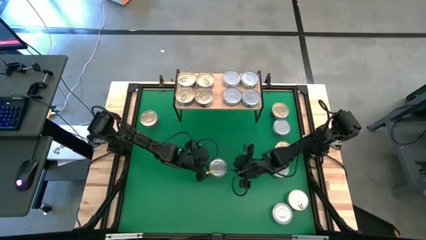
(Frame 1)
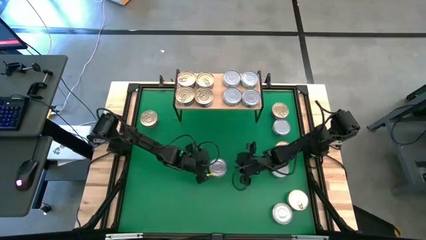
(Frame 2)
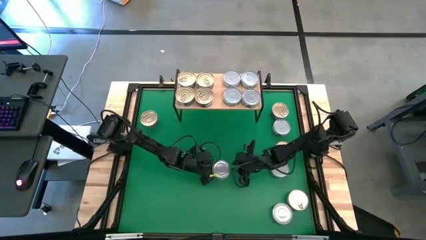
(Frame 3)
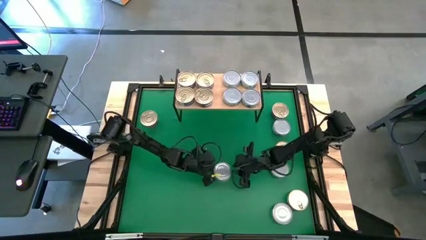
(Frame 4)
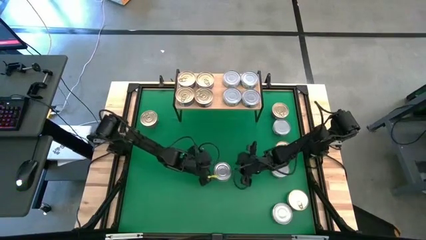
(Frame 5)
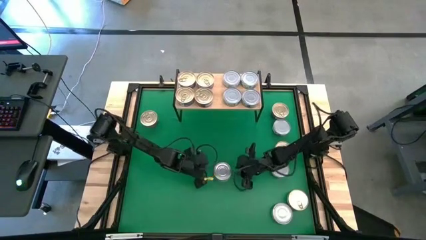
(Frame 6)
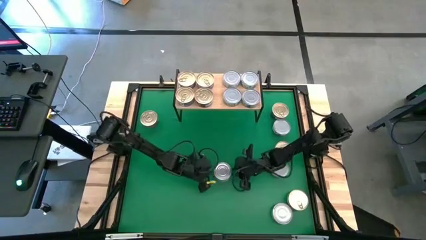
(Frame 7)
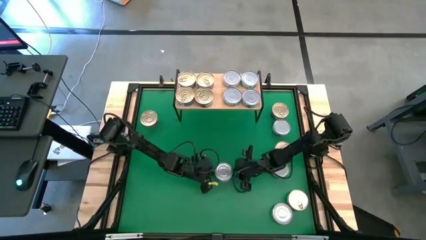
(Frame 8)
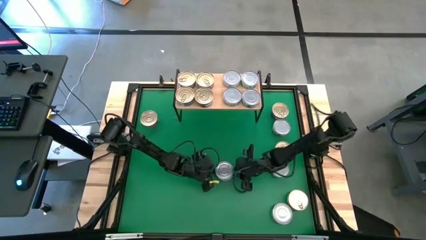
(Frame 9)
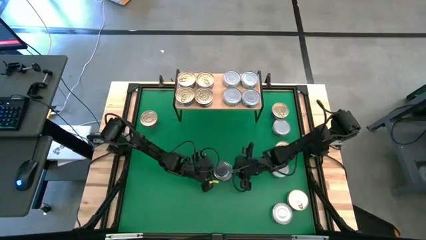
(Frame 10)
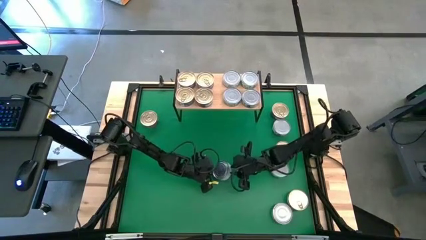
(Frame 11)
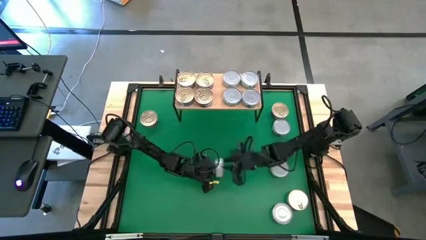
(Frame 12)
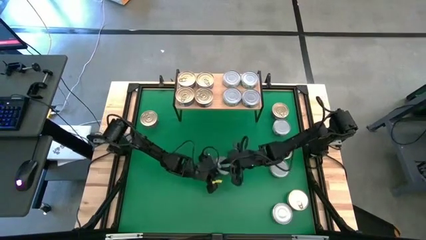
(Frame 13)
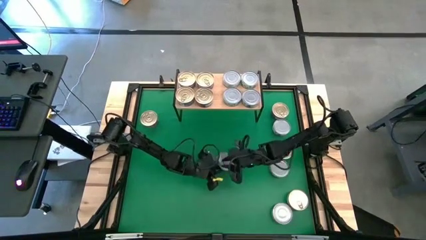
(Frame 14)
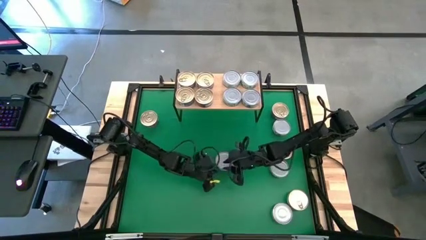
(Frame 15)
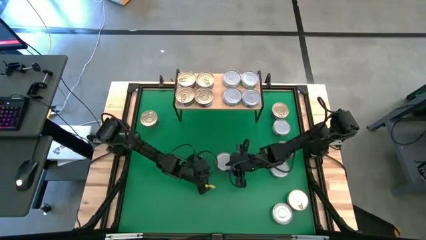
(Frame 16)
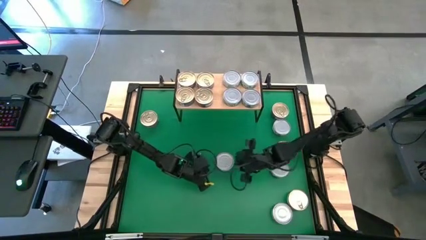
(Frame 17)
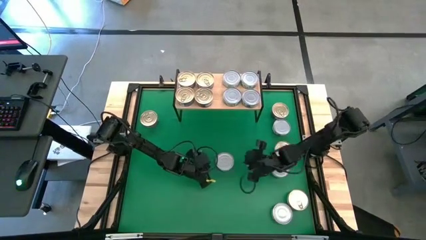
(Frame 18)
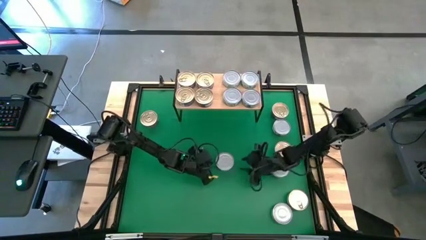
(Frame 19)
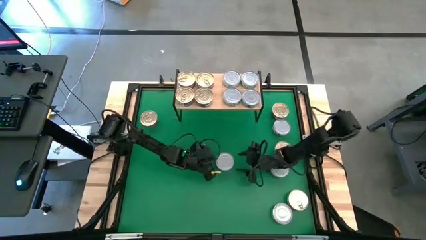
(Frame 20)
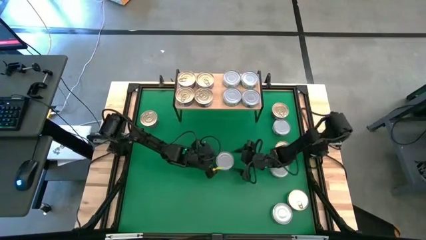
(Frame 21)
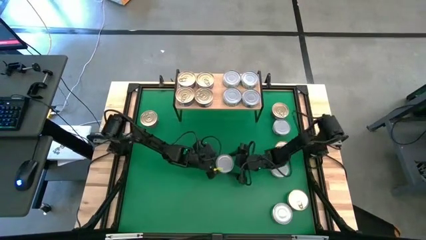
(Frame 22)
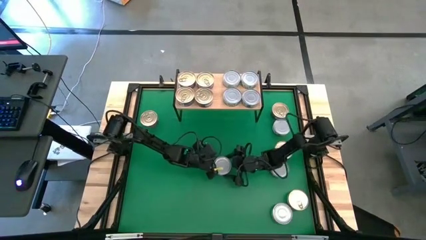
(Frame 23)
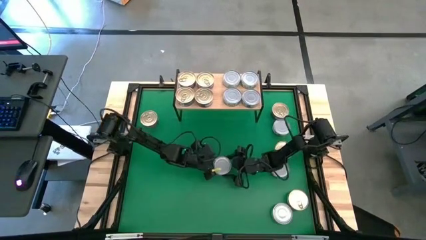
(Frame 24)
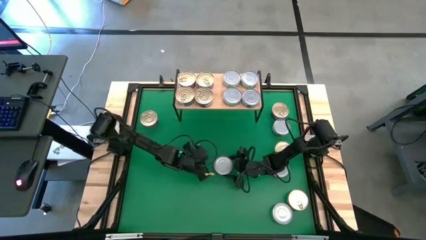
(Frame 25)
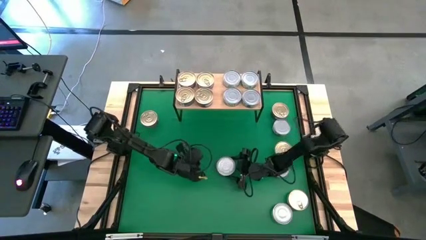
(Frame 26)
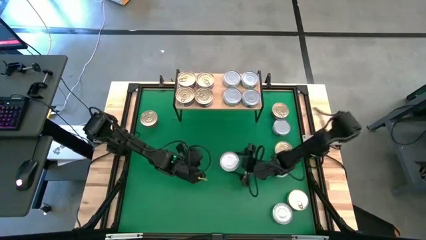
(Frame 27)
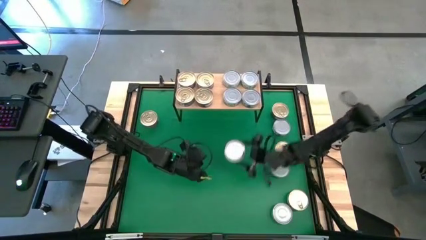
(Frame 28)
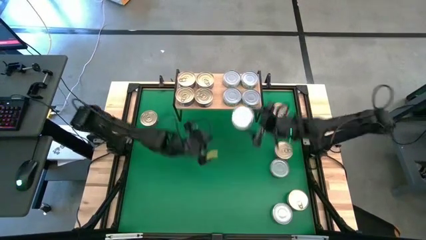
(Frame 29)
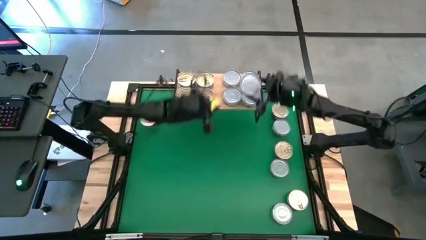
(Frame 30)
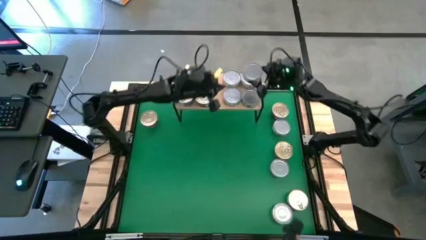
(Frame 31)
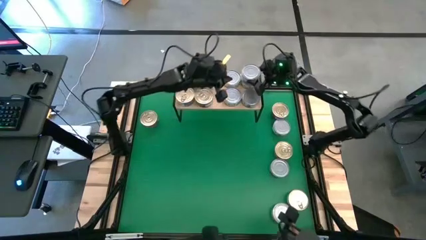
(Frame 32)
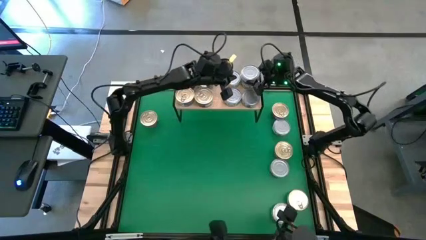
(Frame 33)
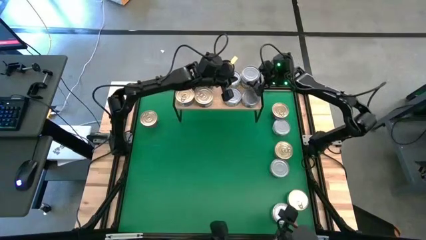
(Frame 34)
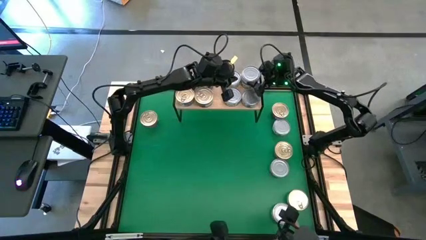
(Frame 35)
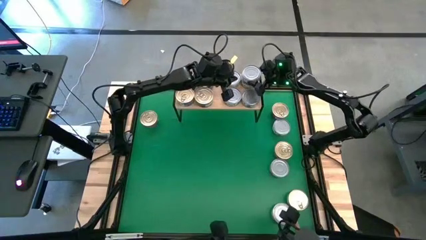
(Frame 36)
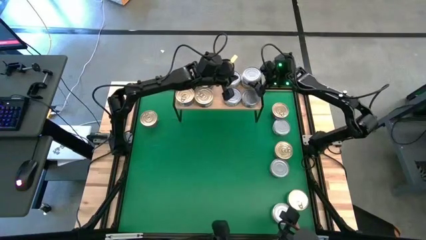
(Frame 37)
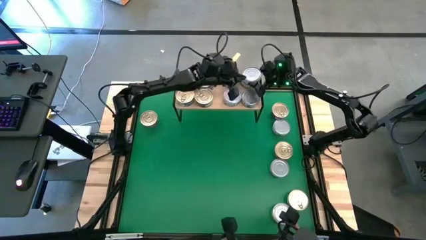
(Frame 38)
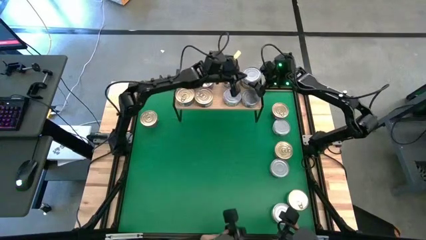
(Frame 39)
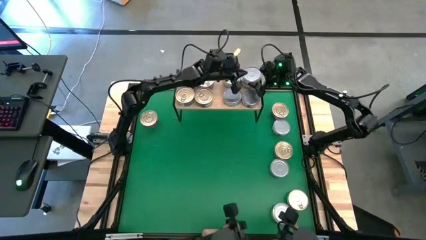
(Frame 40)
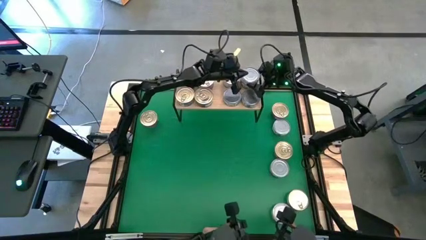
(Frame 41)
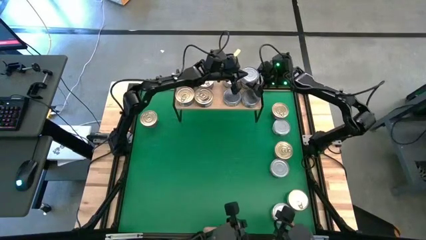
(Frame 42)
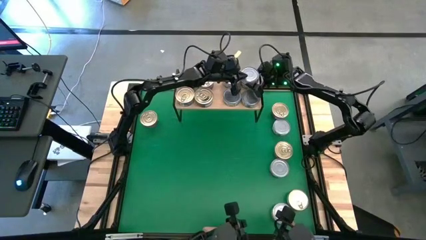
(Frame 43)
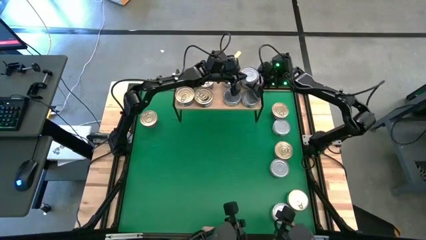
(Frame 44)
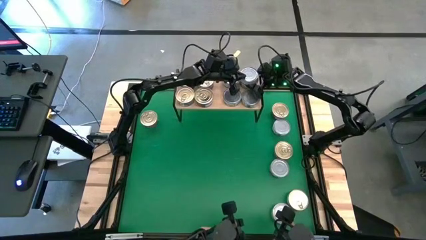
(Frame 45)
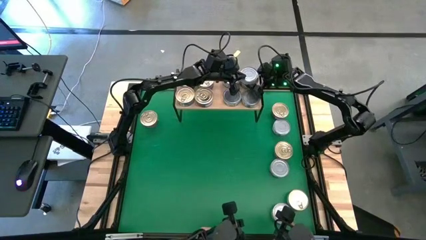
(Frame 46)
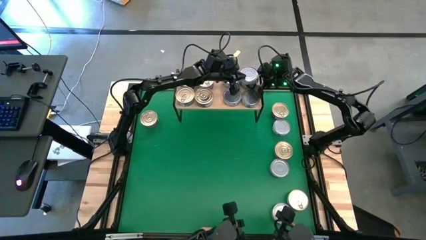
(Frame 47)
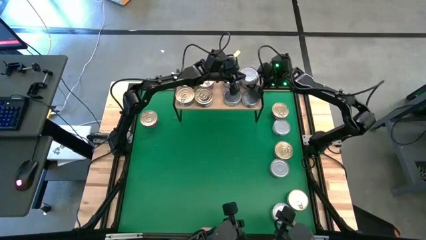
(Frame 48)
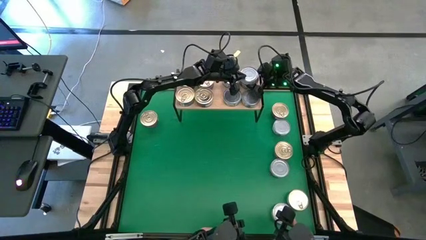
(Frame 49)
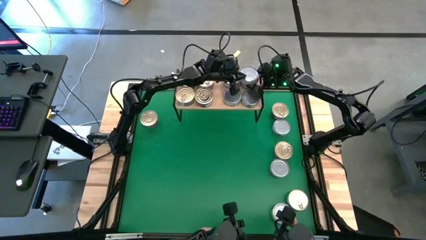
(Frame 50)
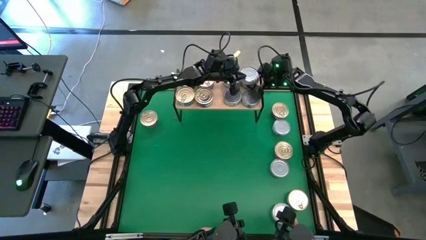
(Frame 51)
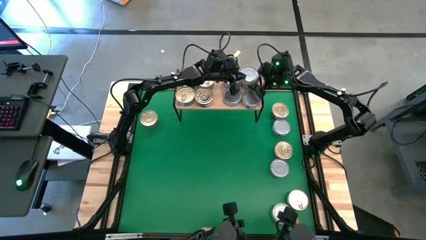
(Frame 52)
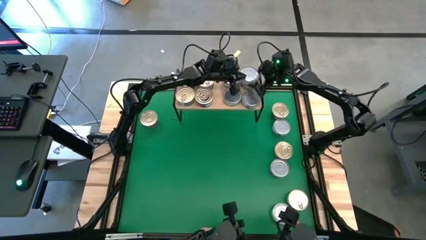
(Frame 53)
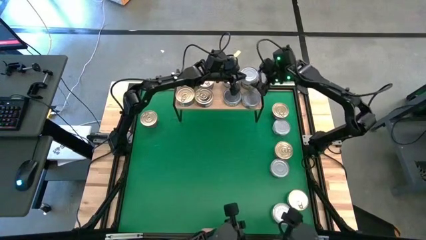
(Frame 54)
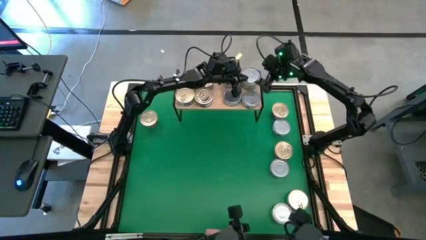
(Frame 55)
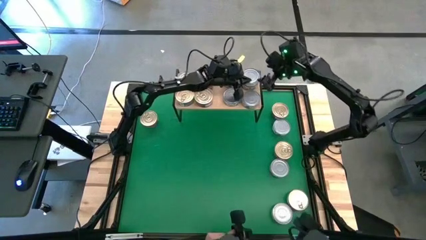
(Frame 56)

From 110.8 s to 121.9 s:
Task: Stack canned seafood by type on shelf
Stack the green tuna can on top of the other green tuna can on the shelf

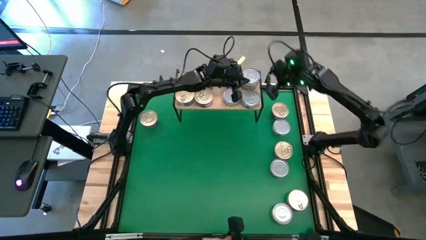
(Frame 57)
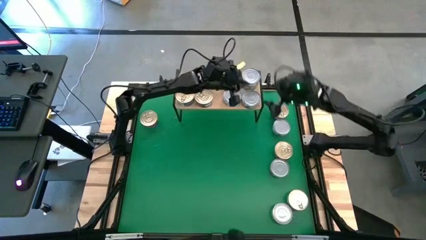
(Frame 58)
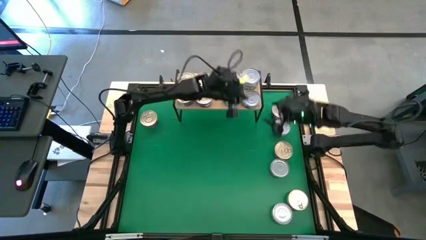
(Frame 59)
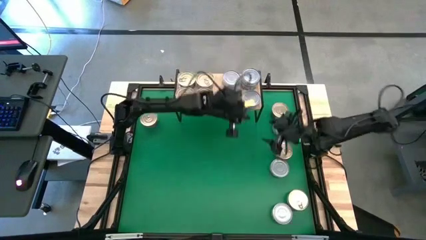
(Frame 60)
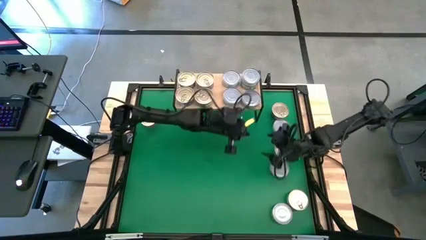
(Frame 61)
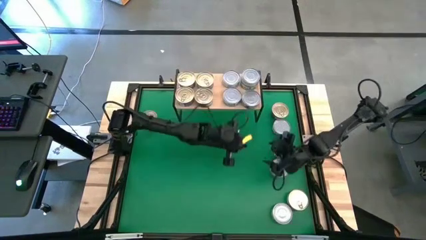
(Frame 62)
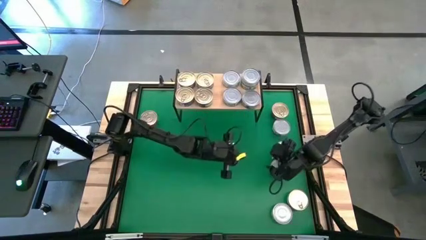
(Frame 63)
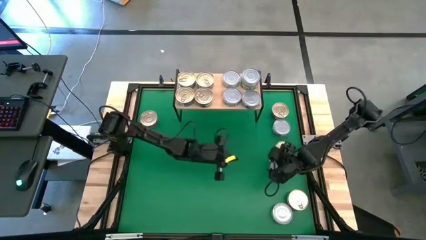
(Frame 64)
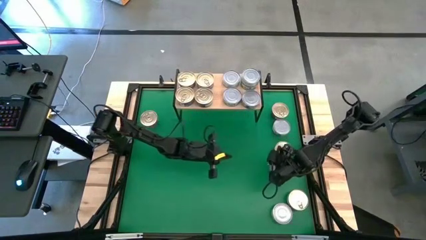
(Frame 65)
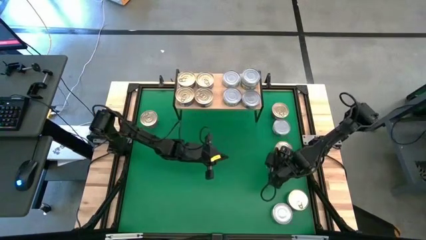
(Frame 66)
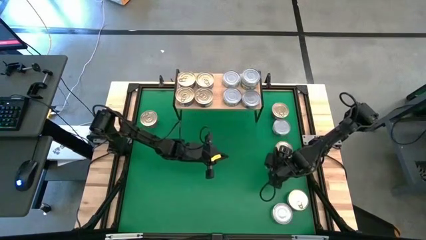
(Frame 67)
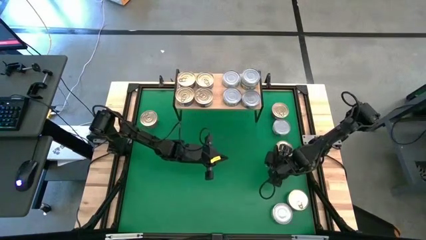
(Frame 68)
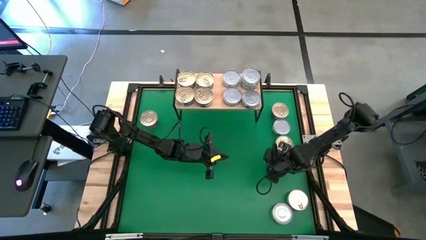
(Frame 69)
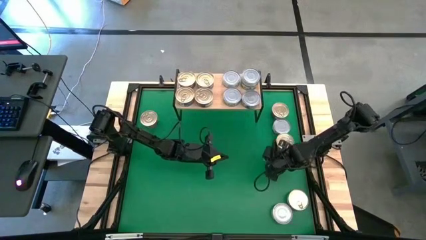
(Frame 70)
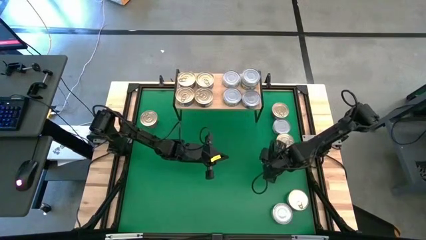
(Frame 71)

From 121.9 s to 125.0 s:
Stack the green tuna can on top of the other green tuna can on the shelf

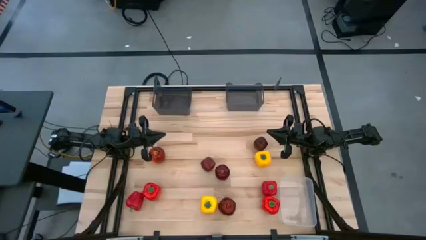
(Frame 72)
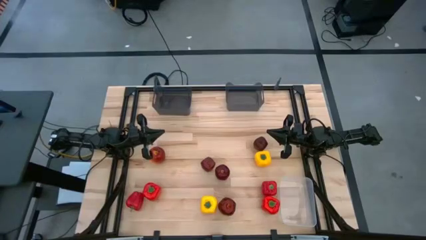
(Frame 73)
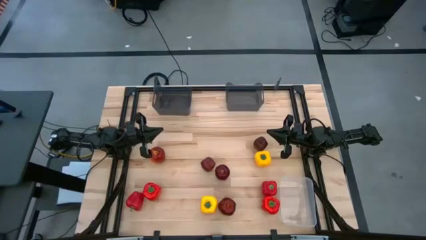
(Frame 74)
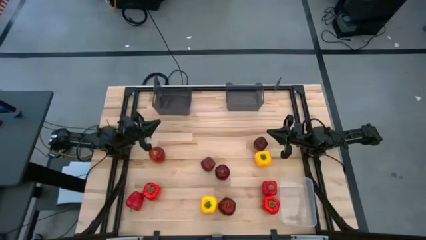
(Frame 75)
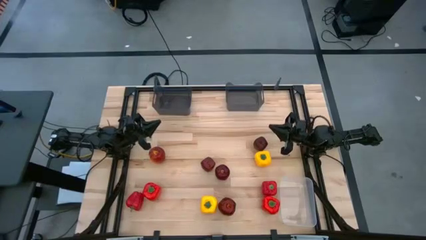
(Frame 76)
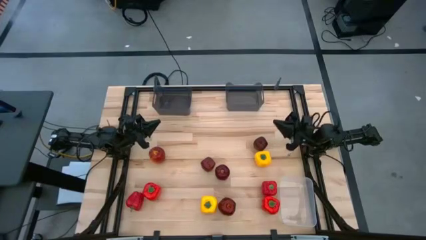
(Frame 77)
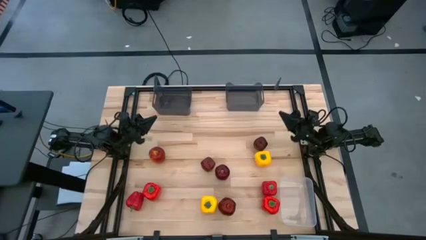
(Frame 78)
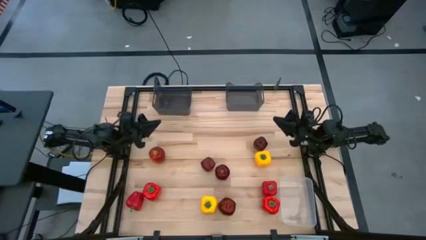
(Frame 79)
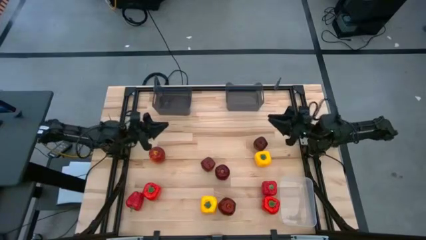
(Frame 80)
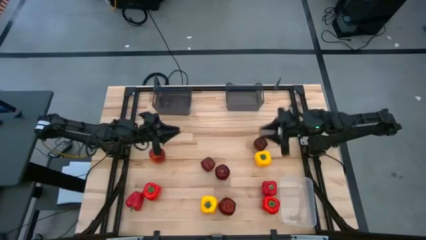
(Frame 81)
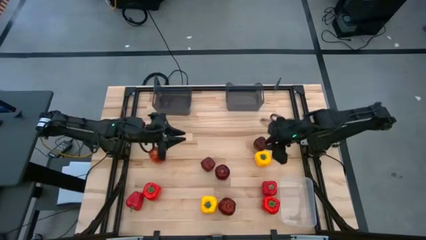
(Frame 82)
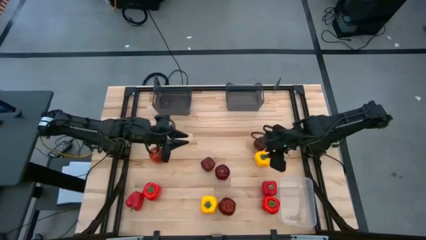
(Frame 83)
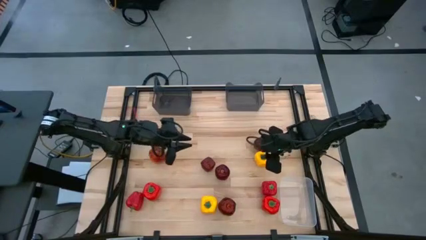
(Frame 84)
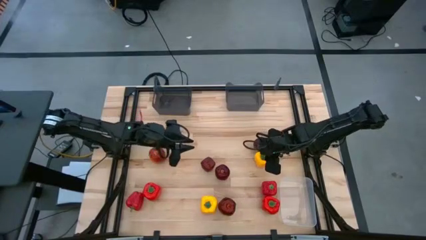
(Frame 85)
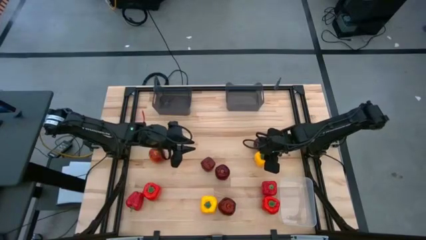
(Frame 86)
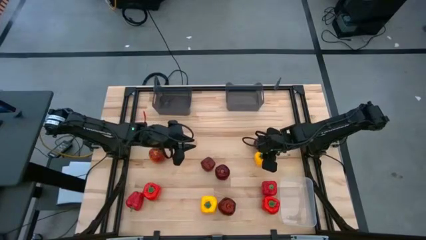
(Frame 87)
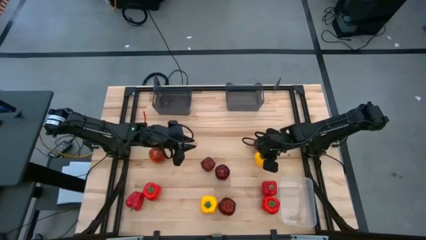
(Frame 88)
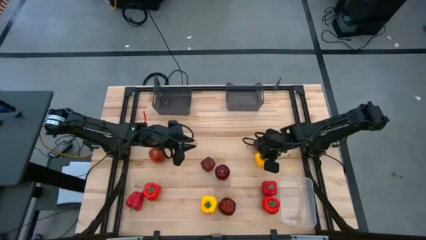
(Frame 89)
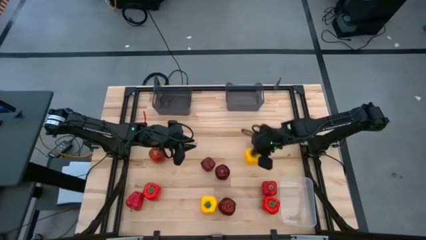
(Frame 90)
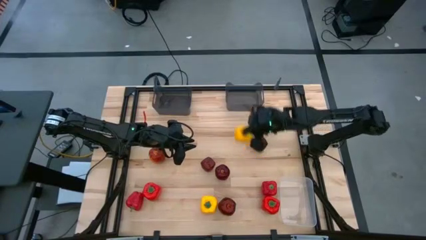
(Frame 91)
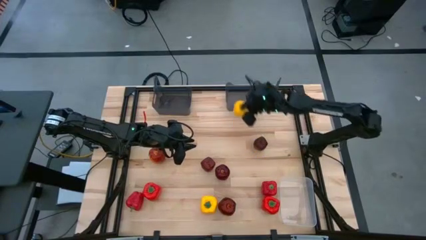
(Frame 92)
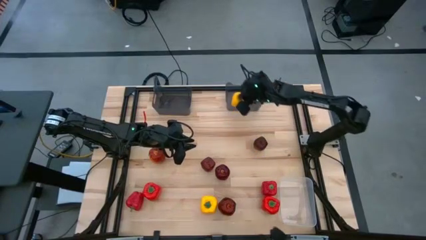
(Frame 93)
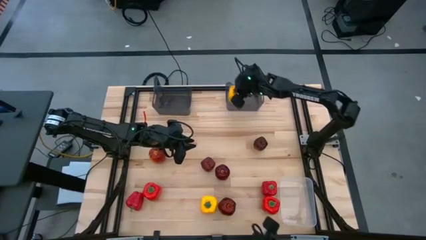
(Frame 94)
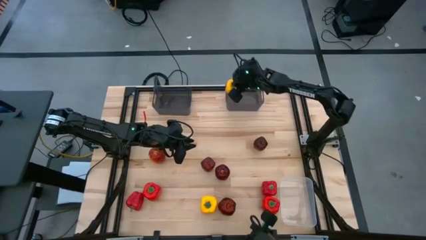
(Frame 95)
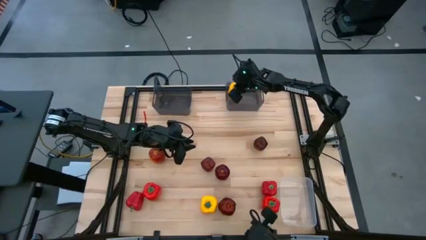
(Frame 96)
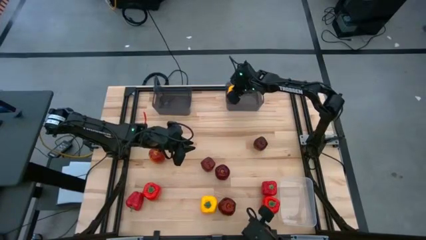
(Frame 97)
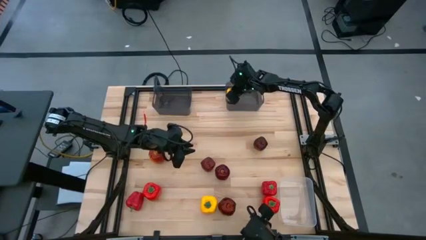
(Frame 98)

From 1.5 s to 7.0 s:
Task: Sort produce into baskets
Put the yellow bell pepper into the right black bin
